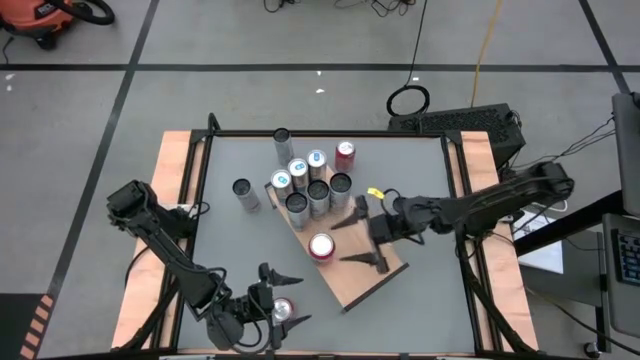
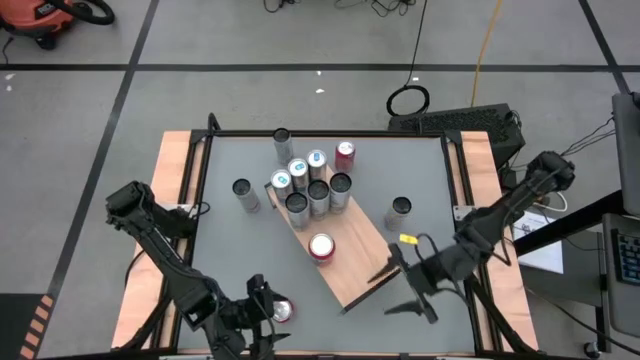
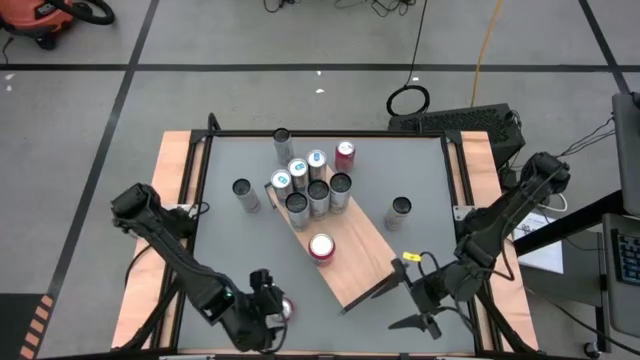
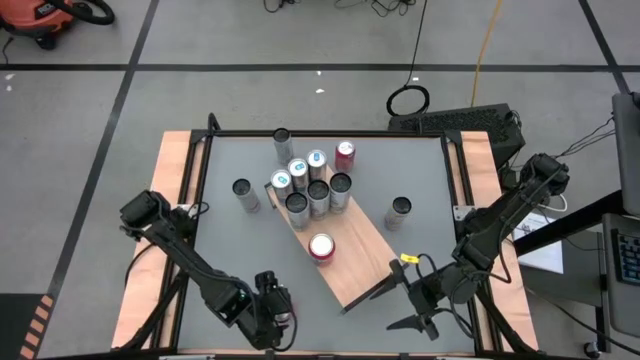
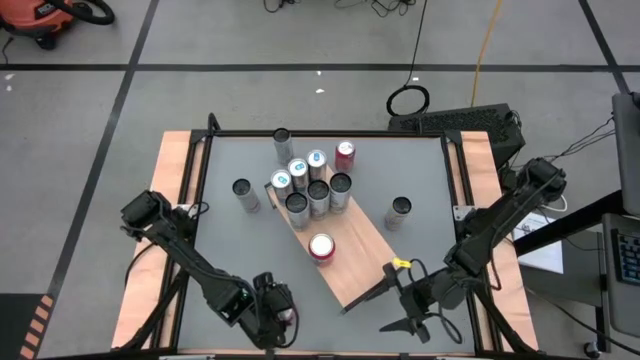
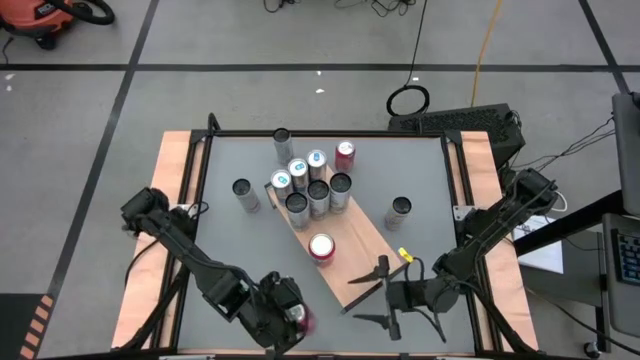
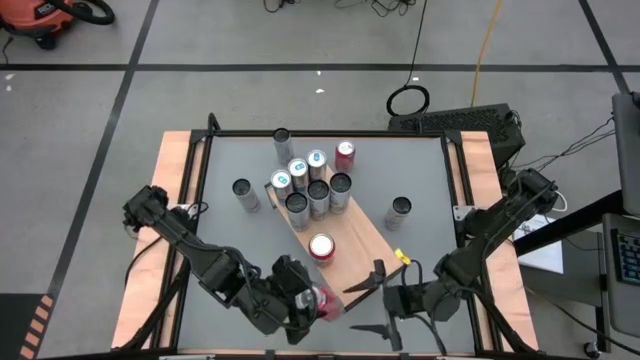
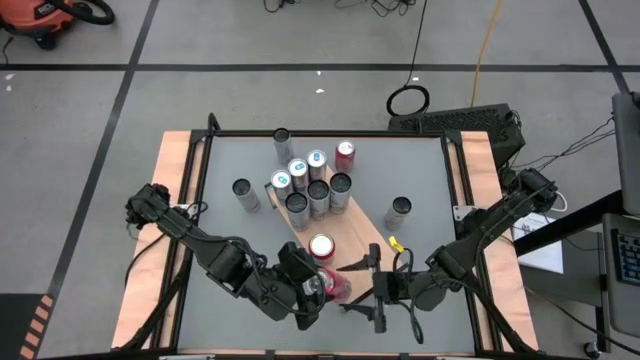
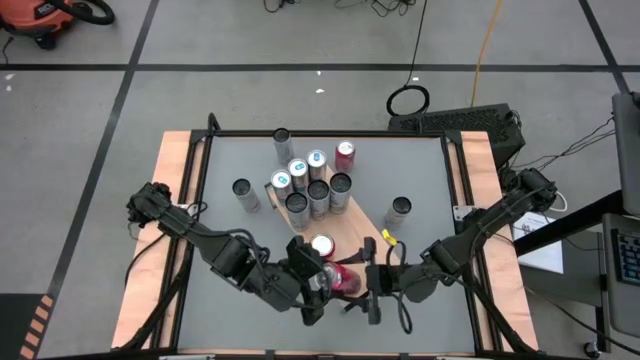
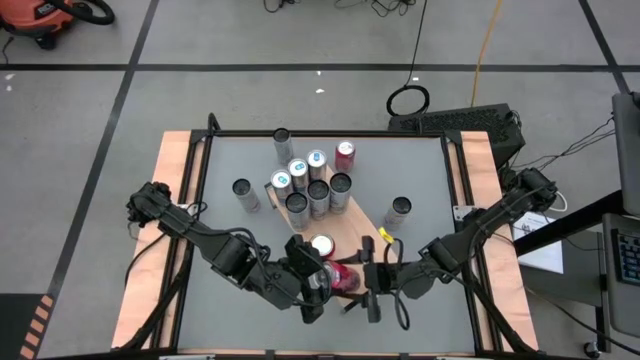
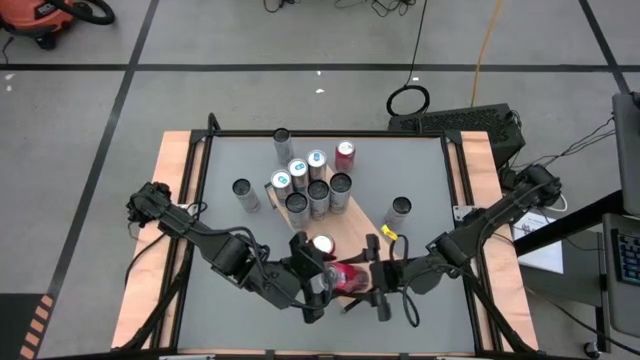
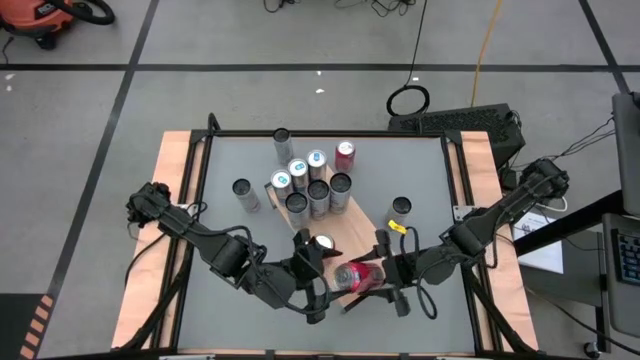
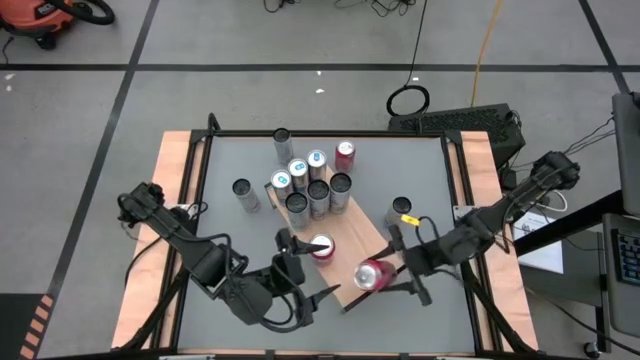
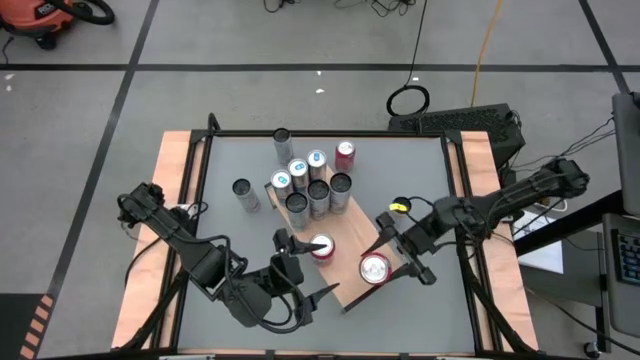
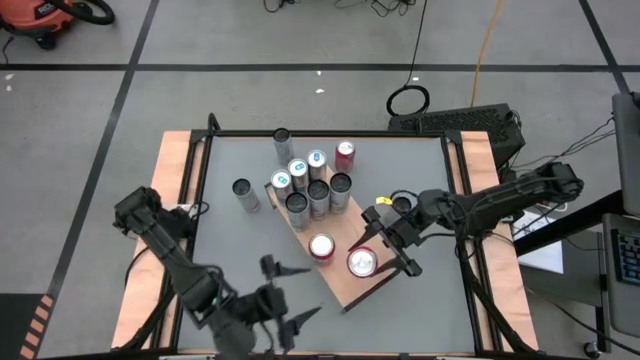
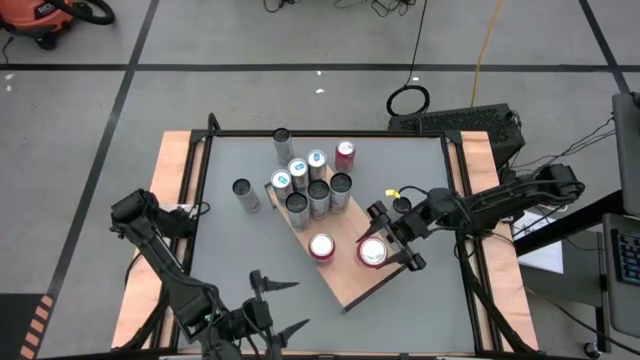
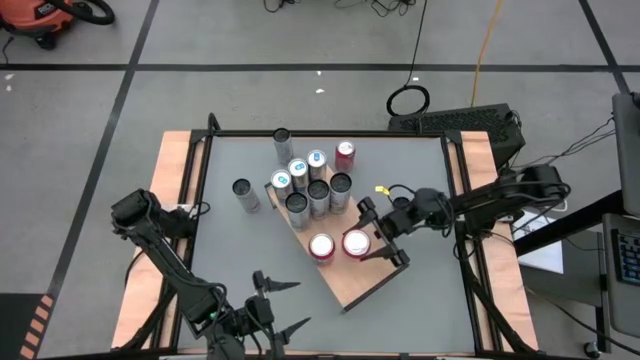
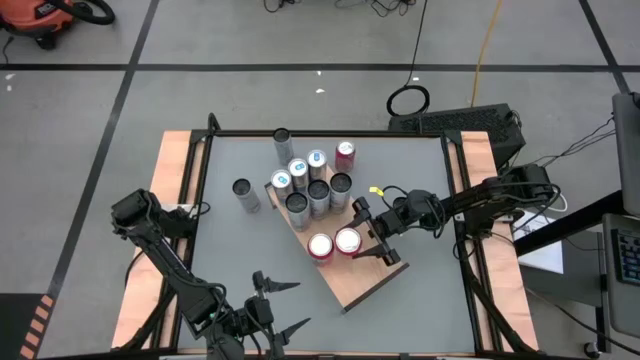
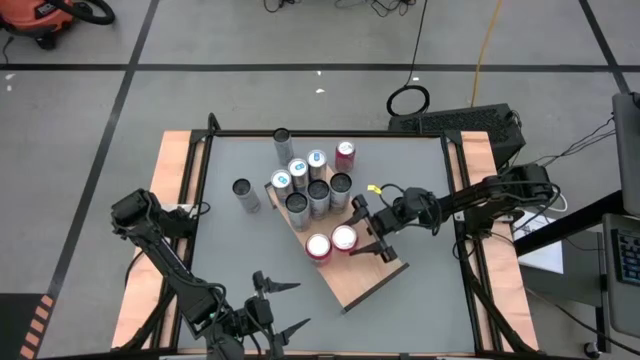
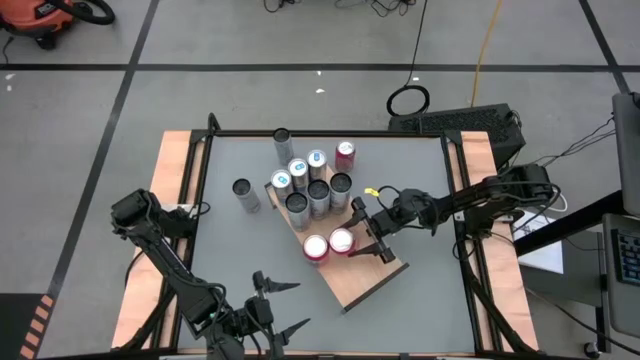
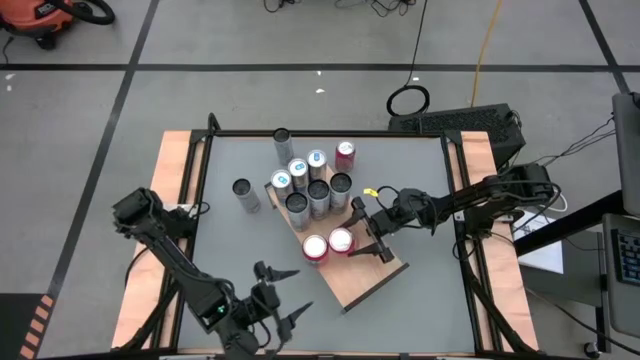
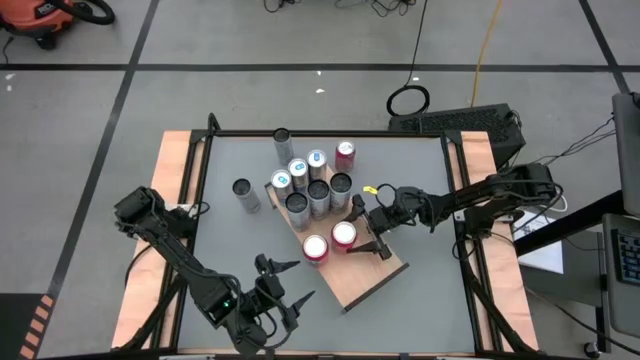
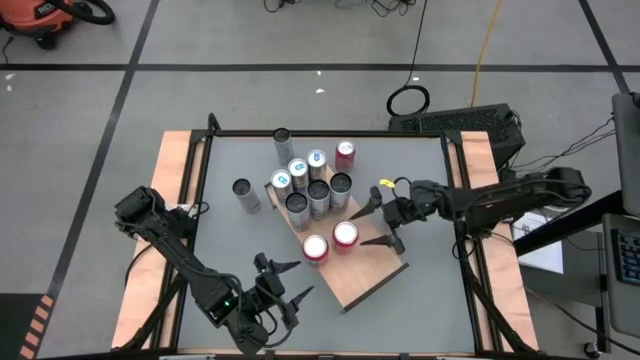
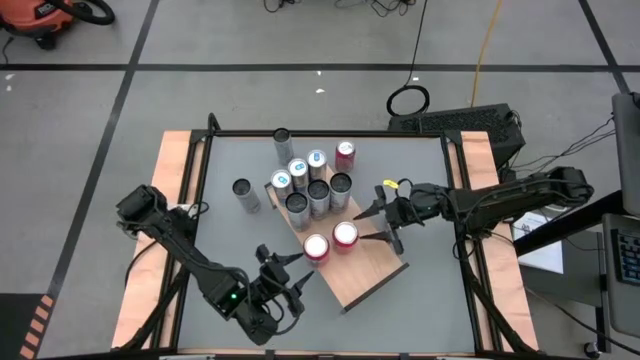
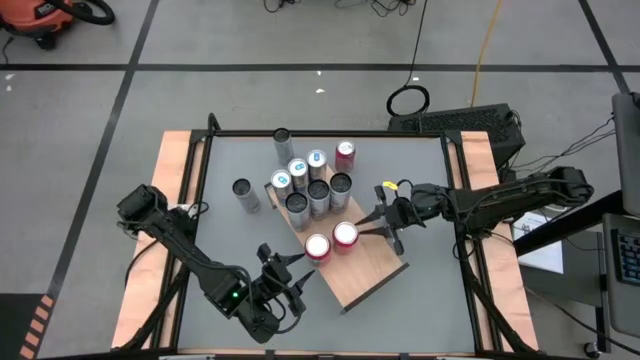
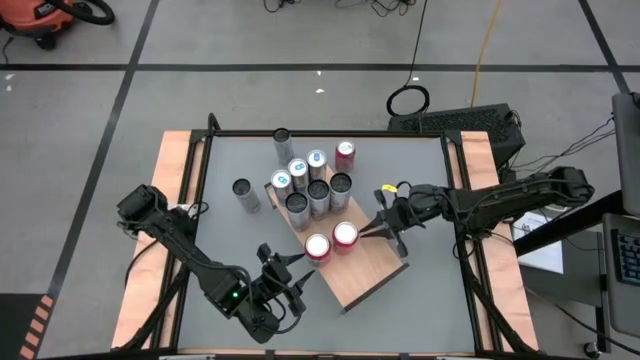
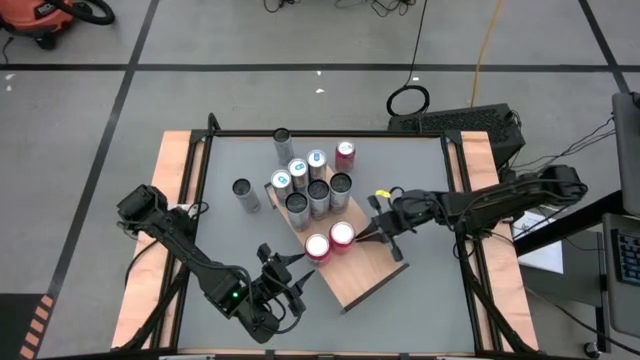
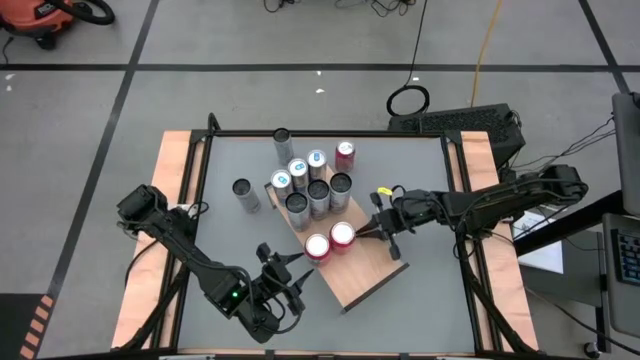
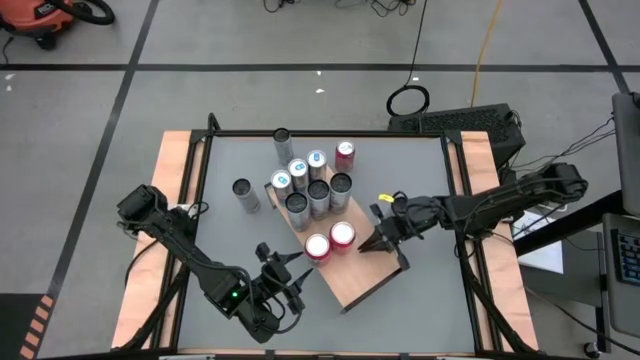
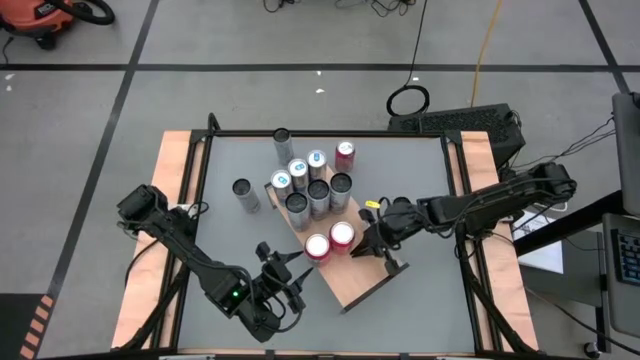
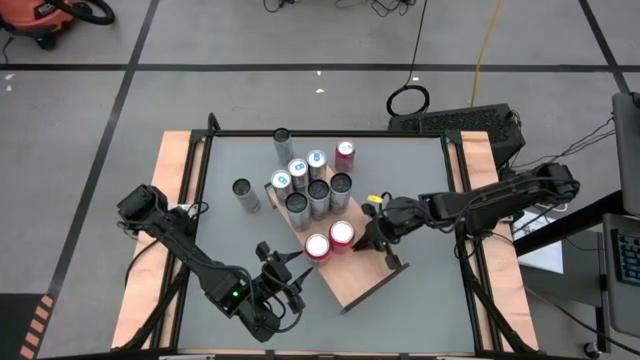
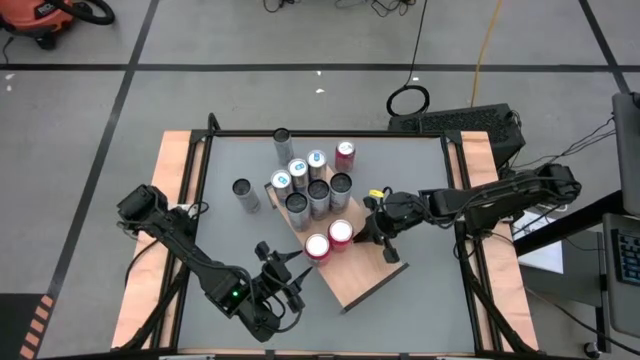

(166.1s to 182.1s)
Task: Place canned beverage on shelf
Put the bottom orange soda can on the shelf aligned with the other orange soda can

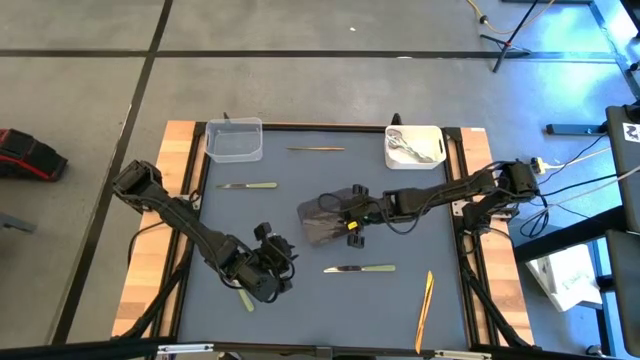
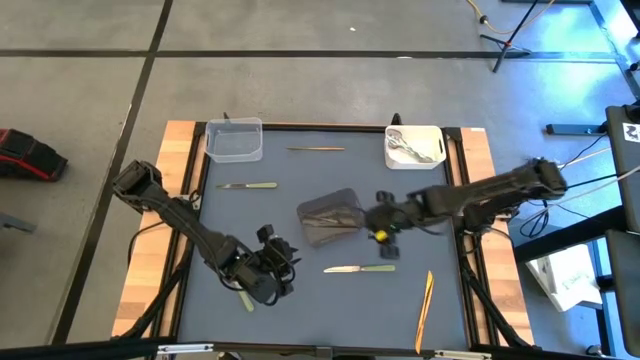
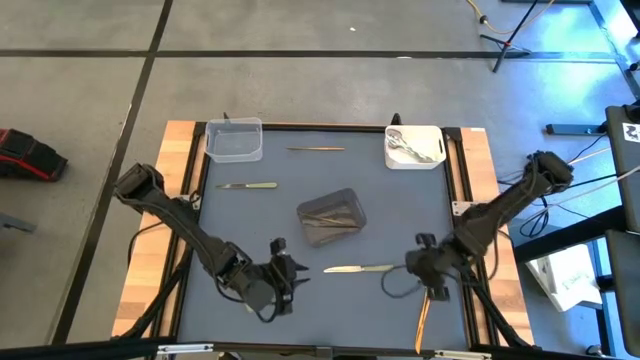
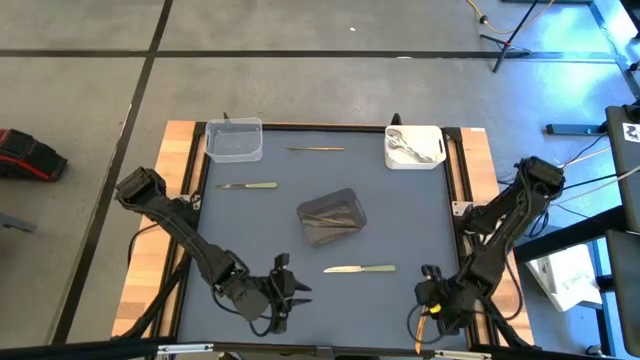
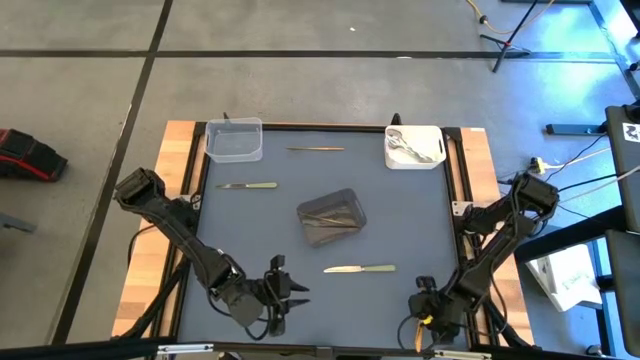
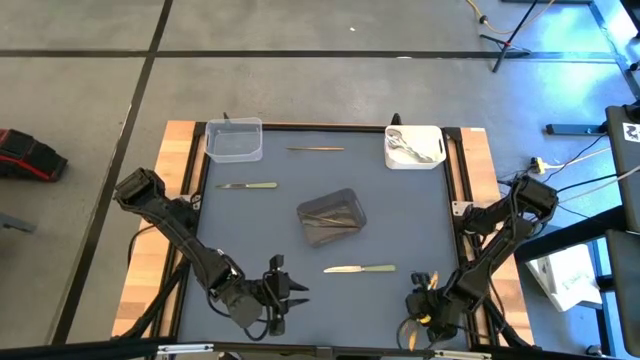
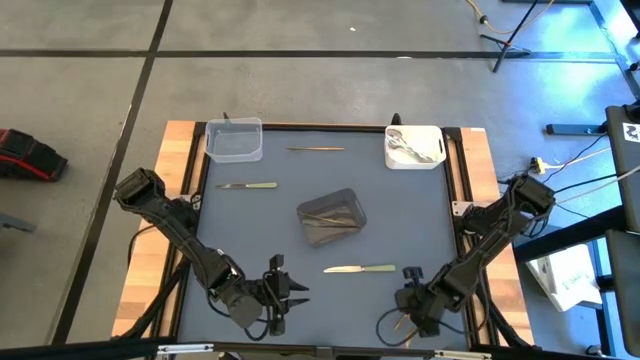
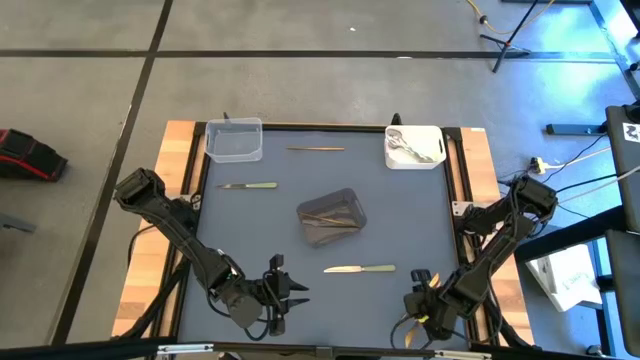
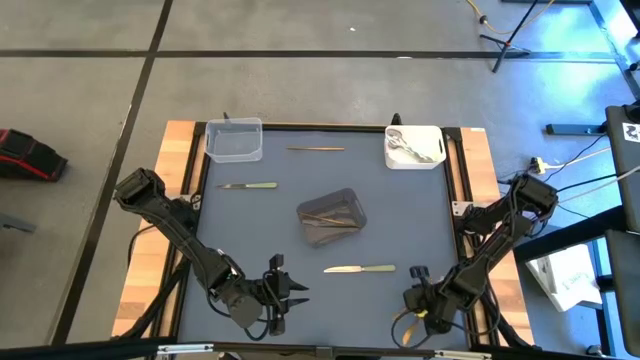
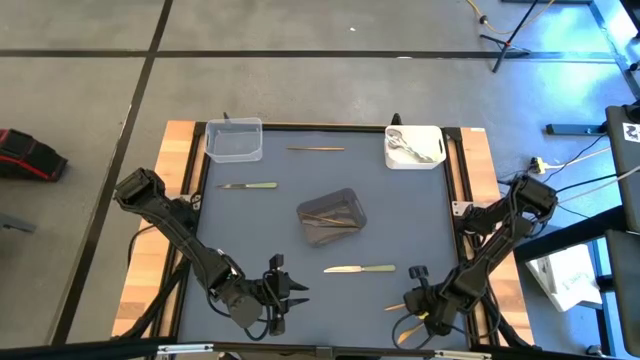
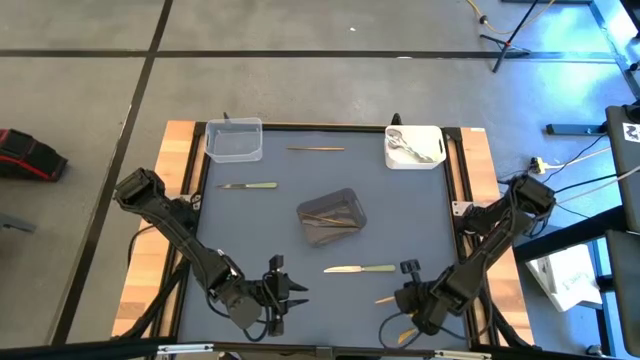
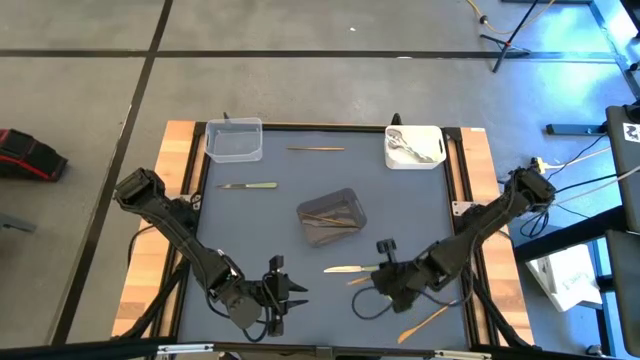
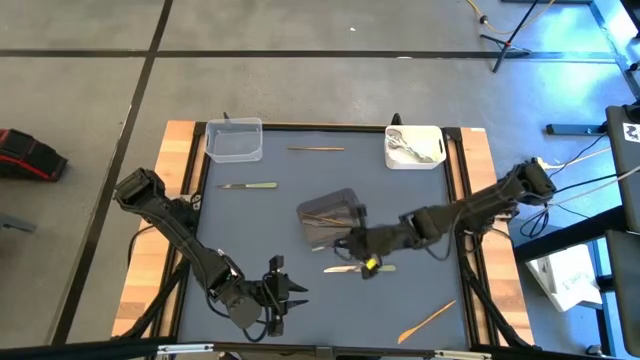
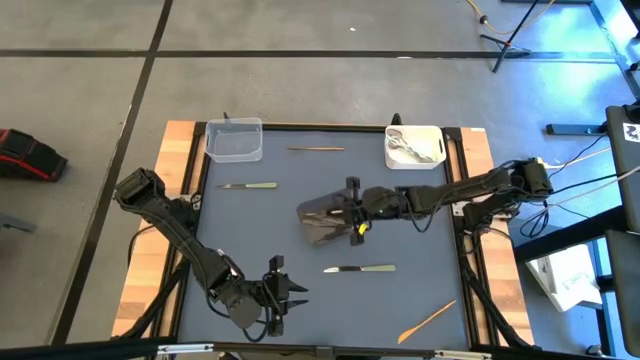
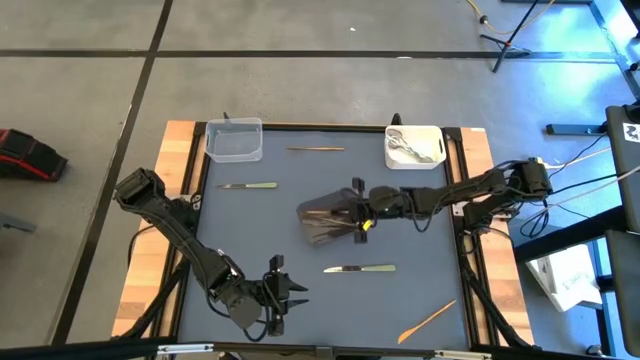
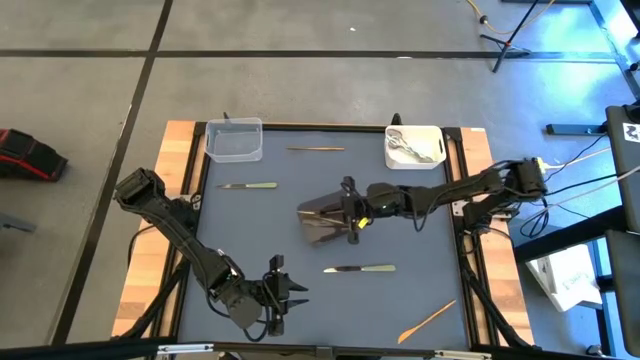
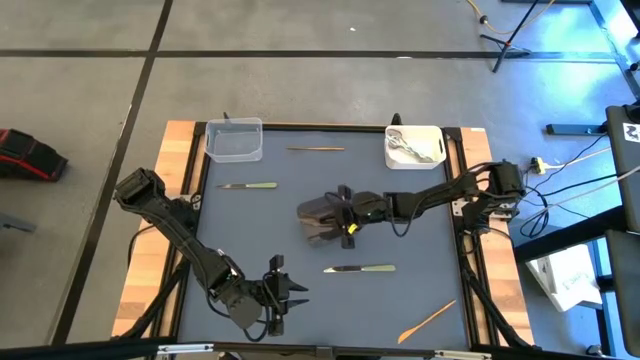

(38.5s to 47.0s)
Task: Sort silverware by color (type)
Put the gold table knife into the black bin
